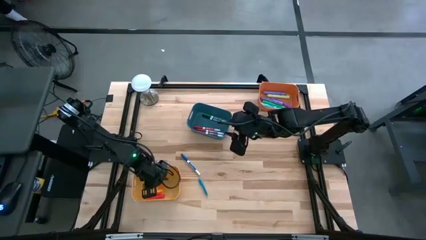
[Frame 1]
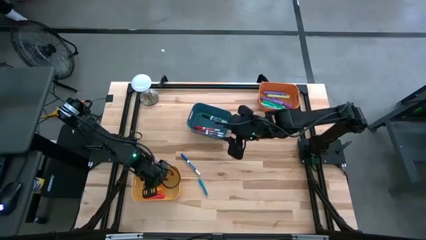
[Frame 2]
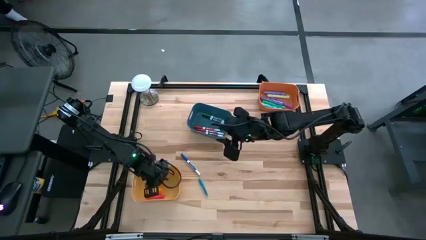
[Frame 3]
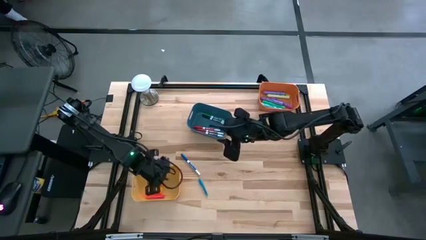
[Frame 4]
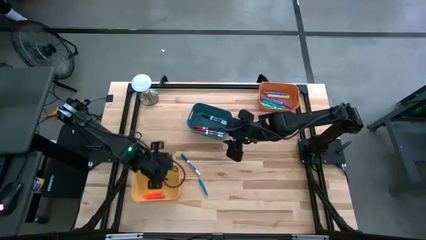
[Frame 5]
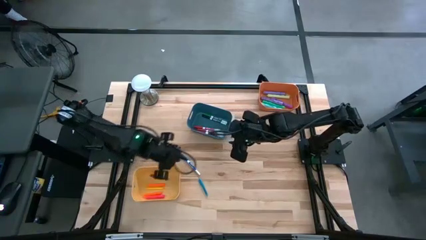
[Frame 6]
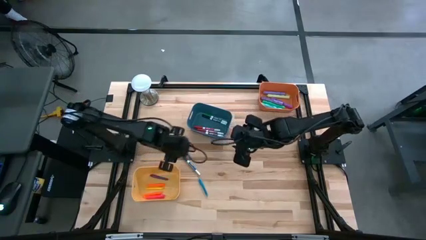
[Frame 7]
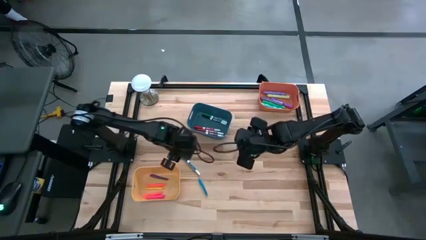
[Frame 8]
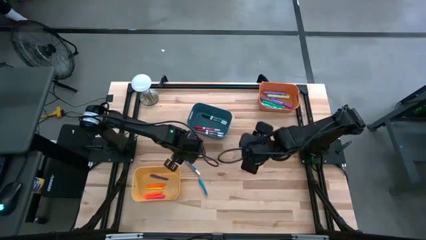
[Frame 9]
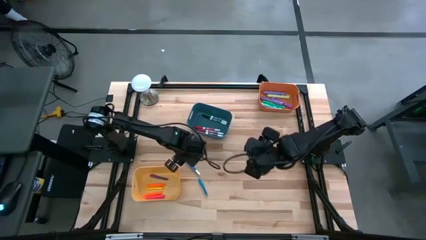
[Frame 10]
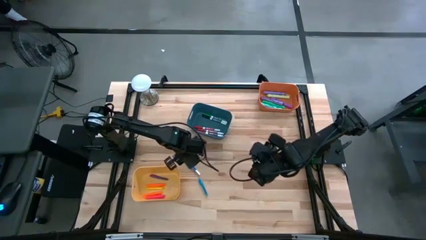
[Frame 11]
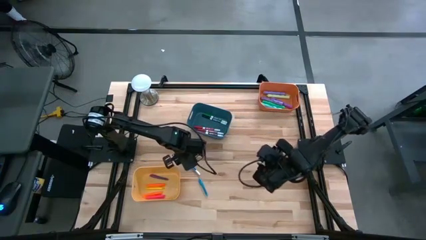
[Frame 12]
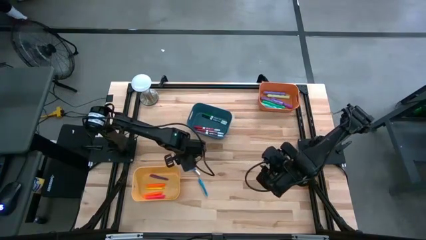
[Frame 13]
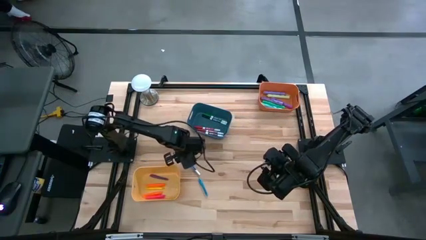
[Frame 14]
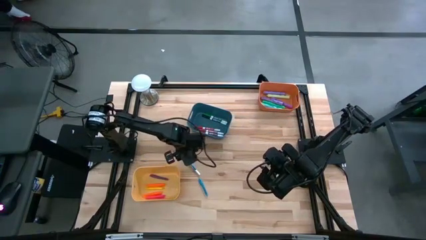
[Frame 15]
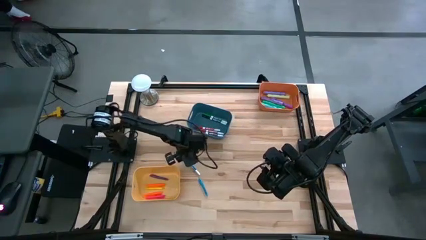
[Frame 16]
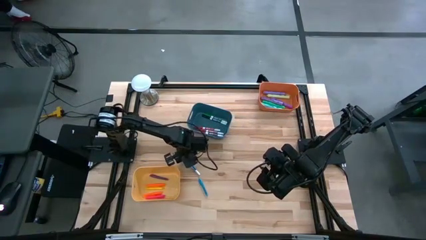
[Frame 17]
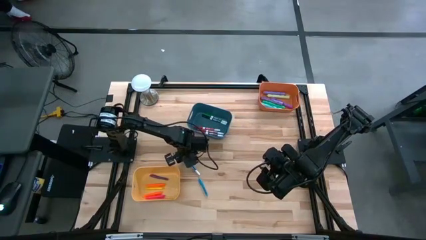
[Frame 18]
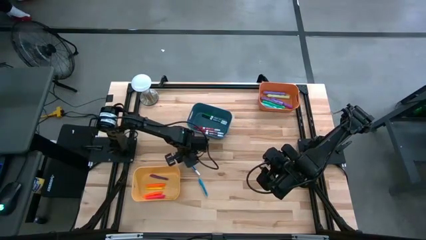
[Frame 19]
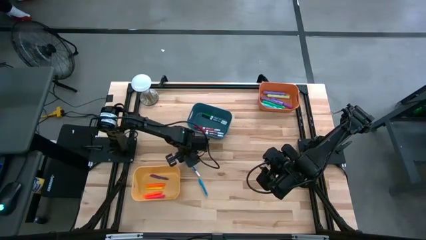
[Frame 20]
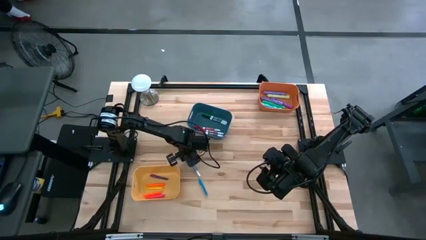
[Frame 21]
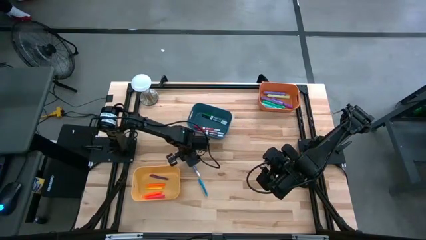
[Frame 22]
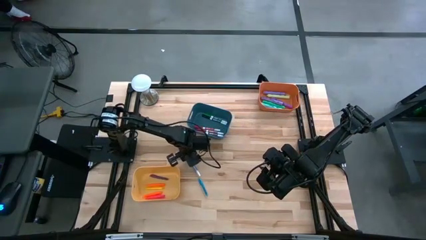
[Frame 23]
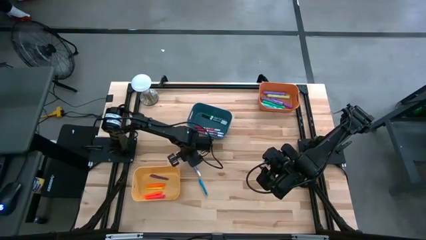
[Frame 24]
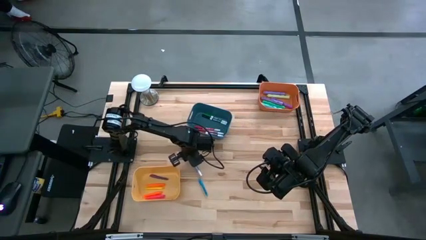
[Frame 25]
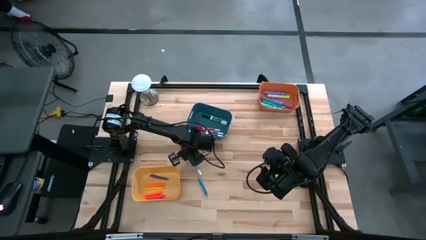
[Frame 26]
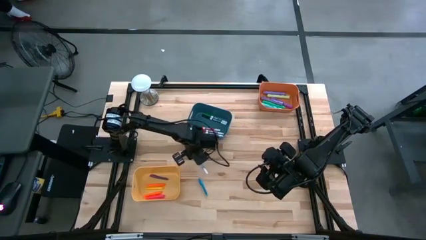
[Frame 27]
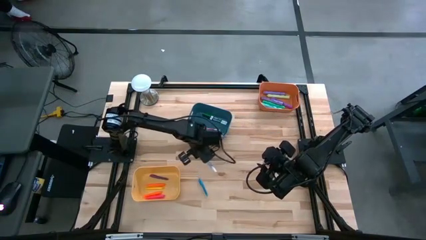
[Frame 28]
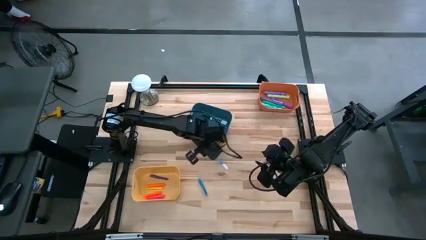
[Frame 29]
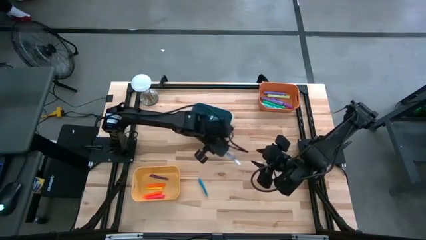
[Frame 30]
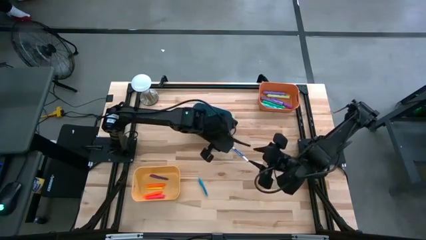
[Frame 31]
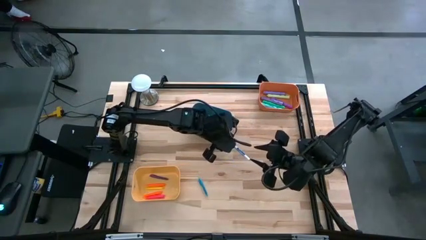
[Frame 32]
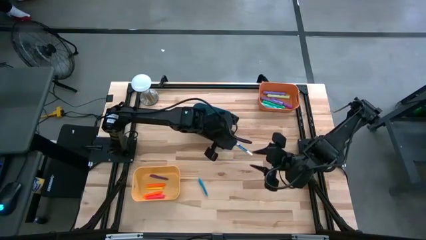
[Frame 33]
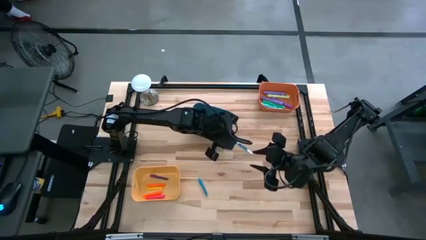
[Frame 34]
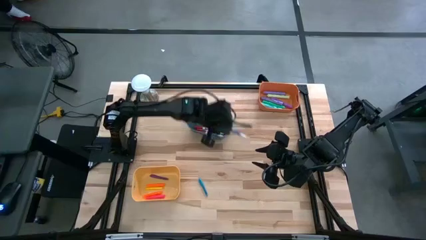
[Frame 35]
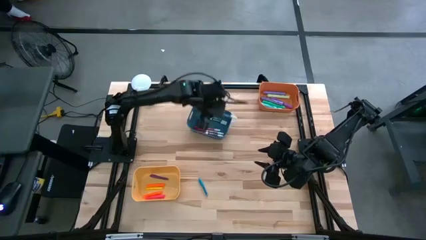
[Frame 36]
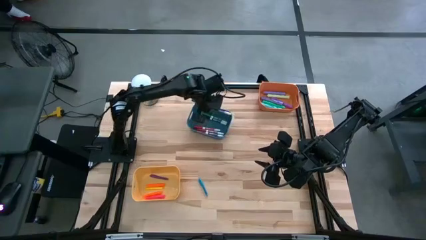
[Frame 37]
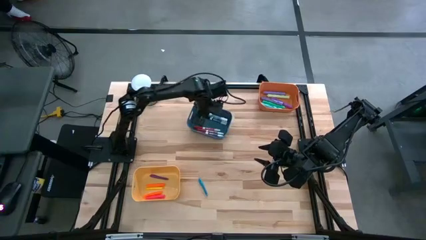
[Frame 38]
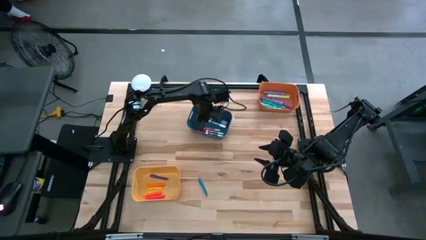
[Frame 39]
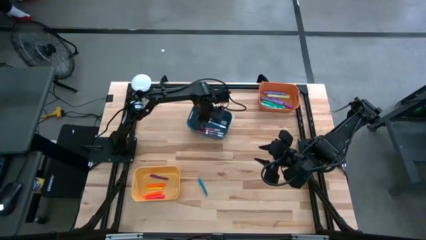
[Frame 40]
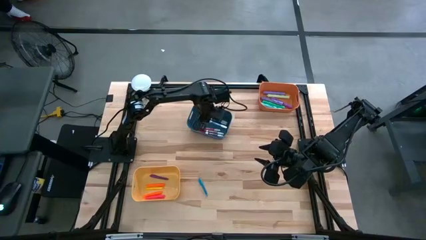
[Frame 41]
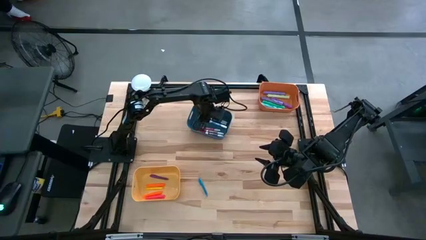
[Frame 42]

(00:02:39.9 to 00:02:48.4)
Task: Pick & Place Markers
Put the blue marker pen into the blue bin

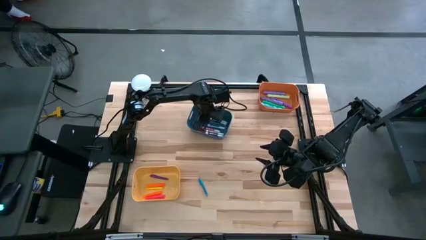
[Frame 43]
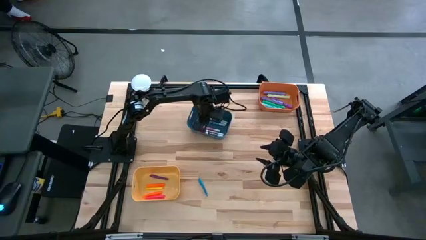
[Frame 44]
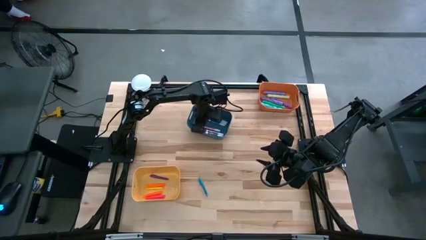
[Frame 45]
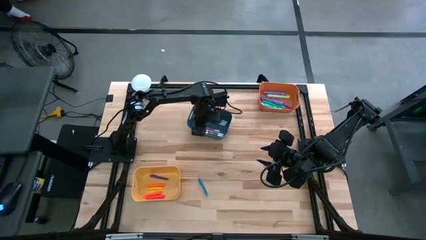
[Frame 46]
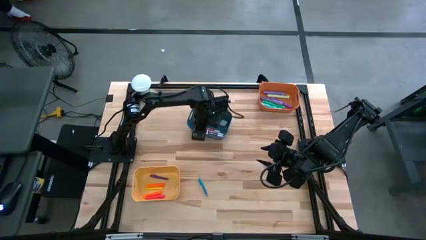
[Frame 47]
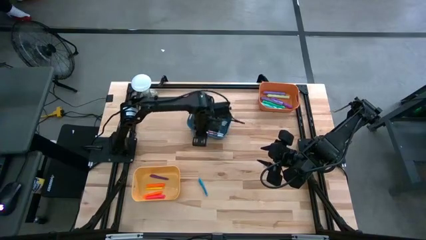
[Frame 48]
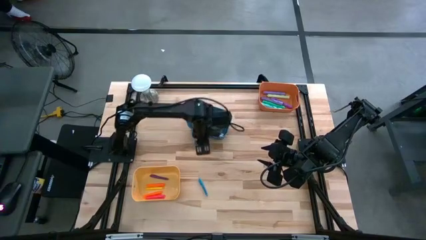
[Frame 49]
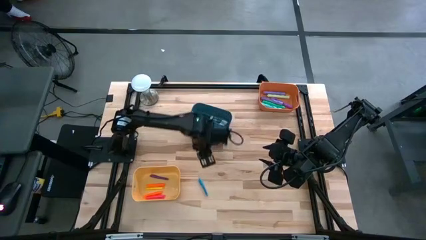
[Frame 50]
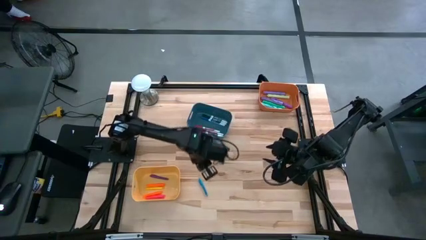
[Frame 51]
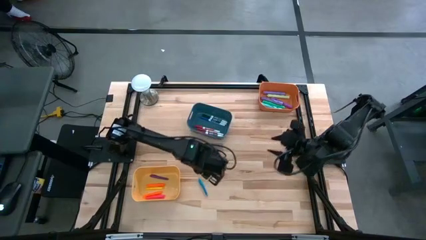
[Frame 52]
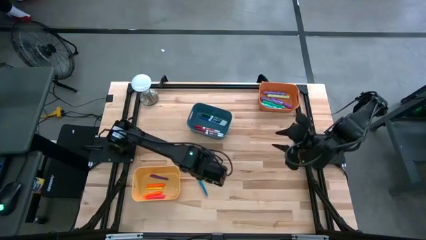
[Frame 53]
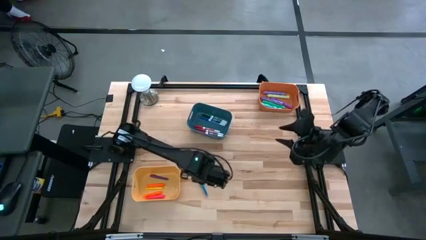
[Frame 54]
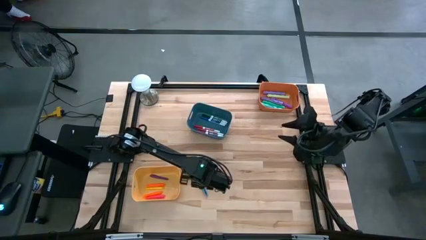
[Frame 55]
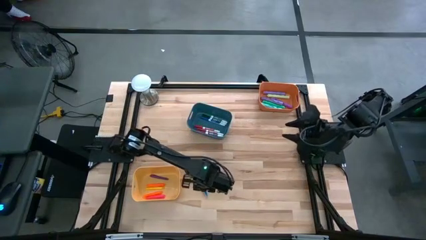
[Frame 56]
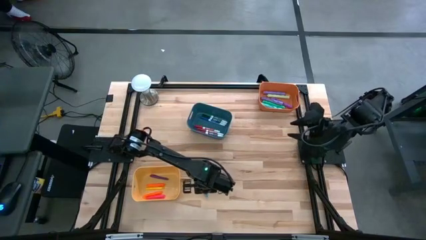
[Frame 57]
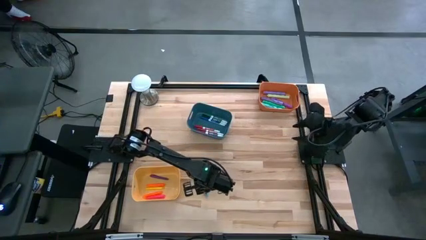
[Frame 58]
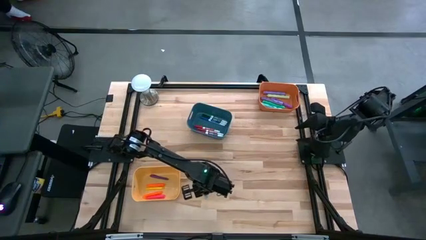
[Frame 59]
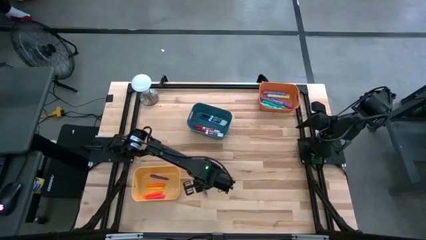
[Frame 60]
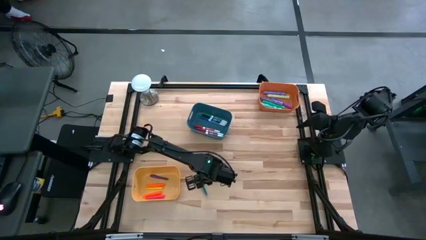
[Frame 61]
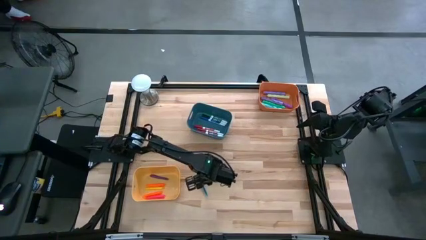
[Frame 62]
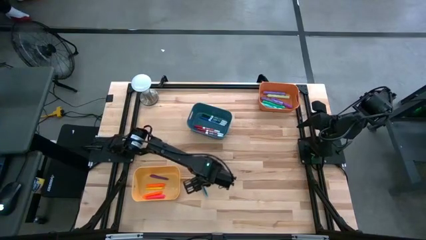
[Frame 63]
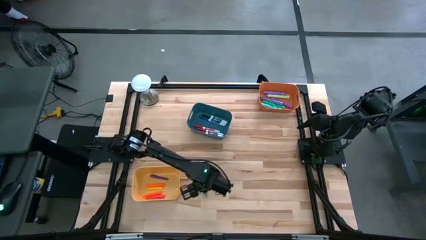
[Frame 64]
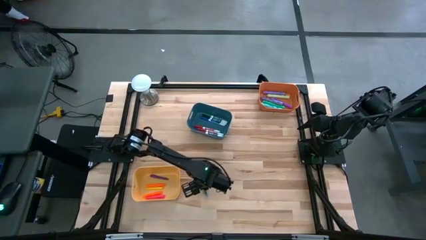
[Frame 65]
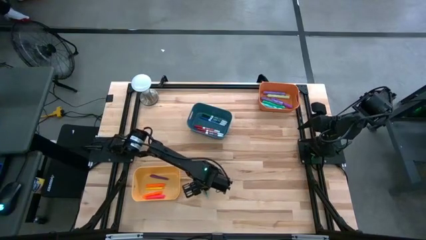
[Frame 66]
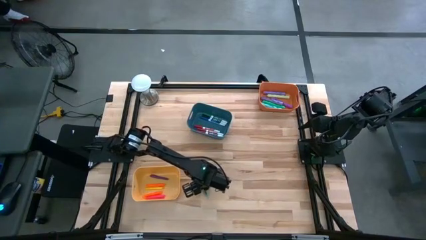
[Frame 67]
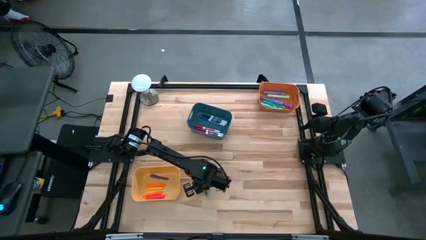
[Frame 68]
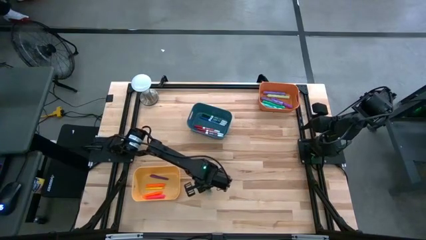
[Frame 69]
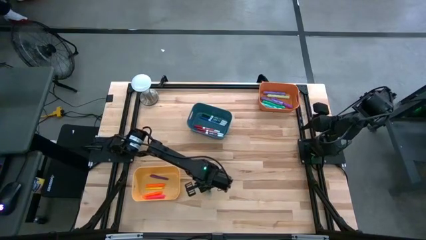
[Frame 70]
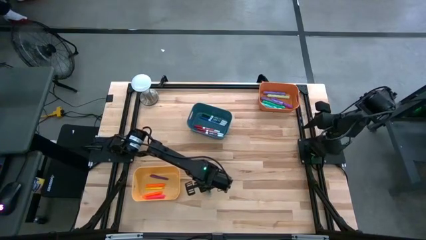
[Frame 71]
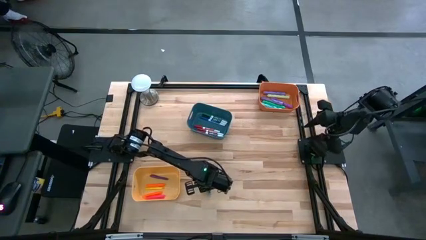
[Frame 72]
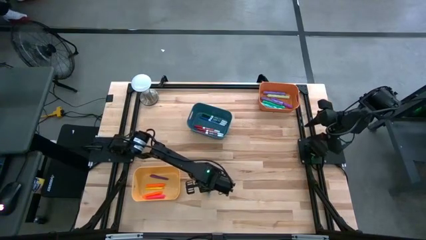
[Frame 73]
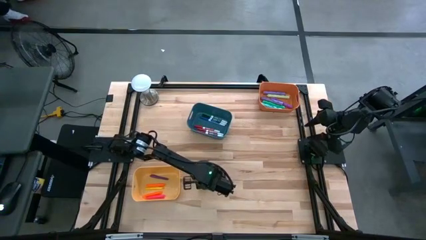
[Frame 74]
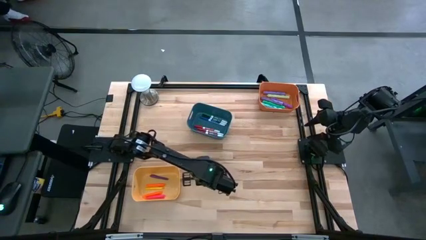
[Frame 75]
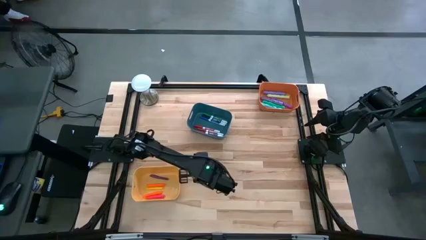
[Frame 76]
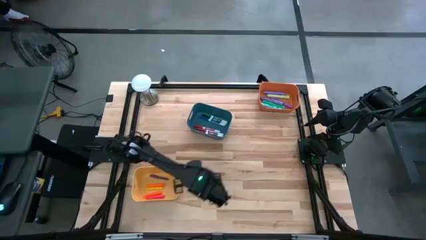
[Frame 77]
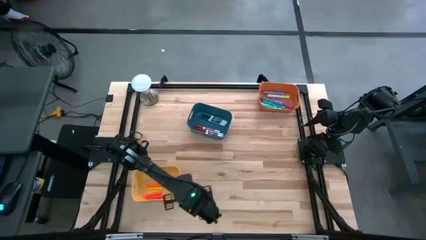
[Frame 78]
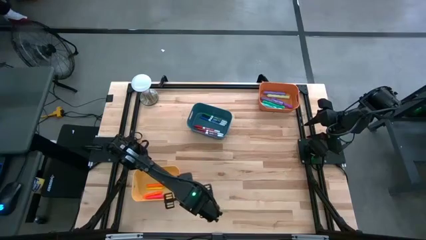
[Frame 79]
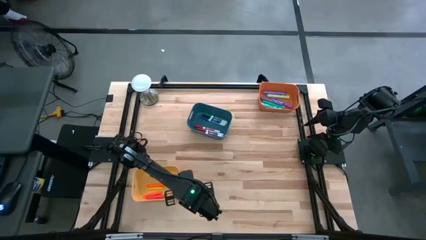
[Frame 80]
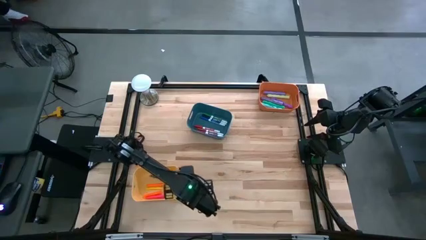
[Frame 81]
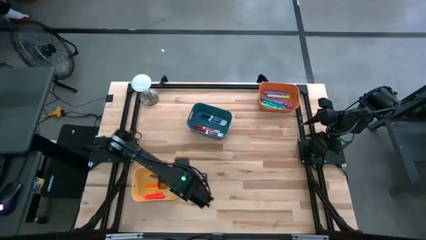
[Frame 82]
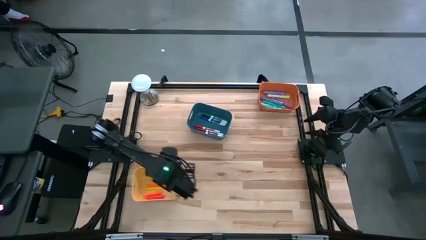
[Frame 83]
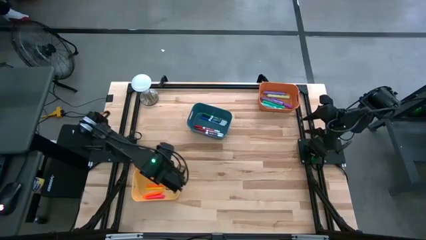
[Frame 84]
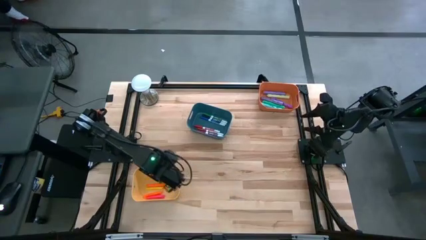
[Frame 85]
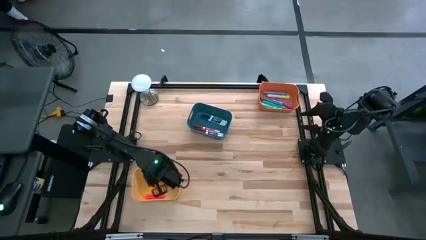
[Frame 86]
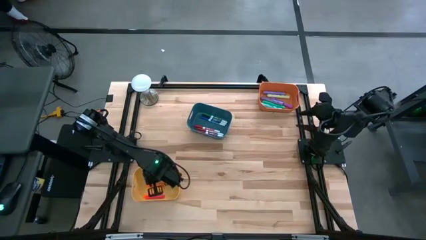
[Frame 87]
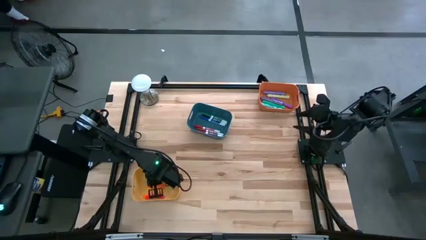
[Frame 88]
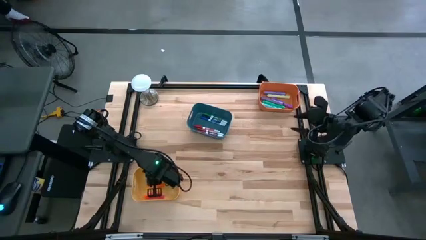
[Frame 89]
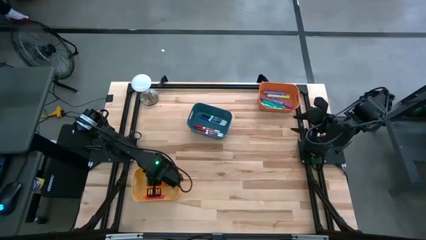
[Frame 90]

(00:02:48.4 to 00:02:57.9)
Put the blue pen into the yellow bin
